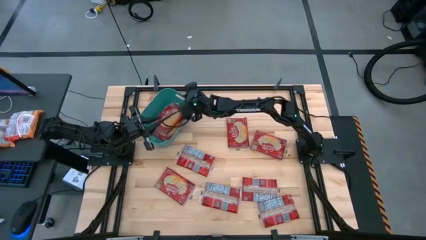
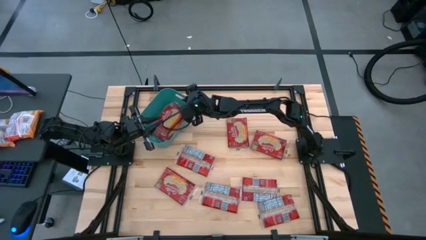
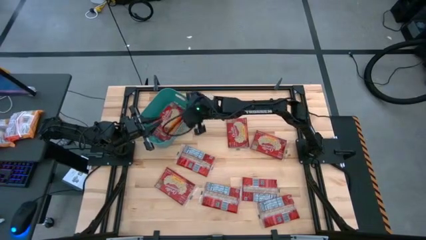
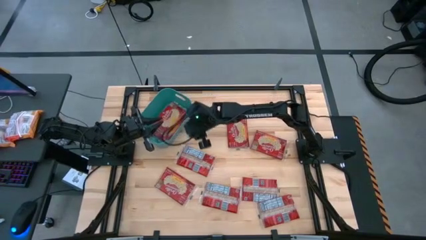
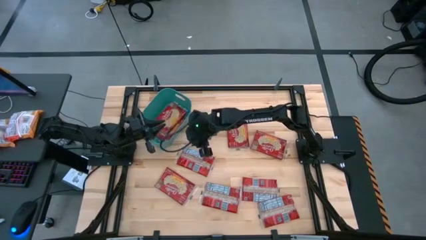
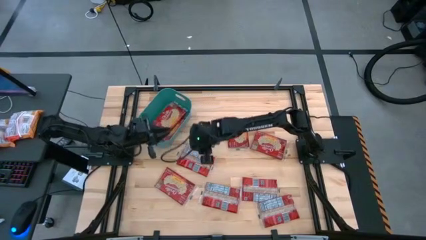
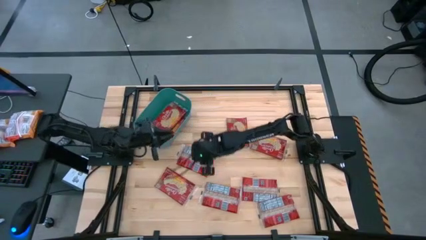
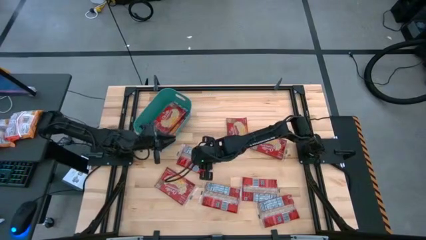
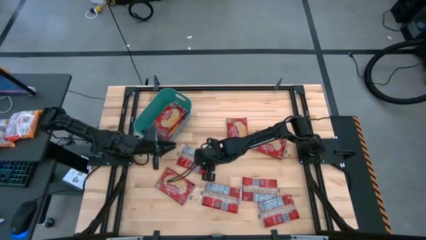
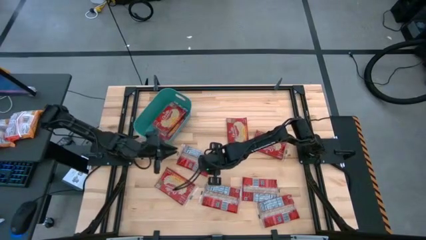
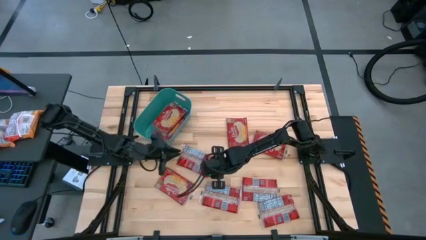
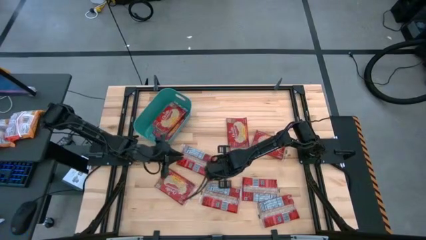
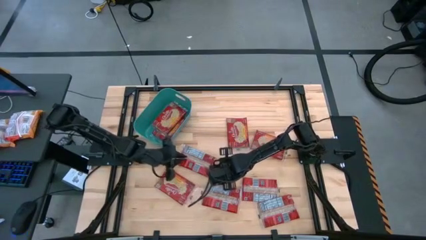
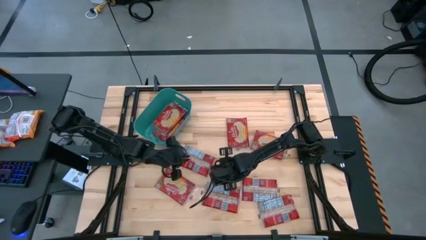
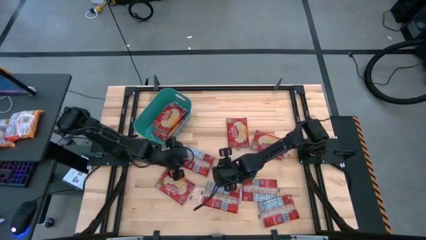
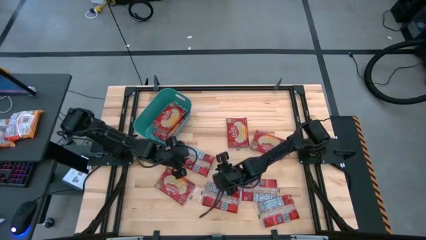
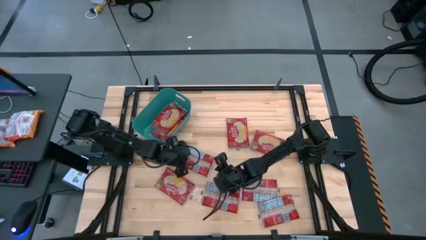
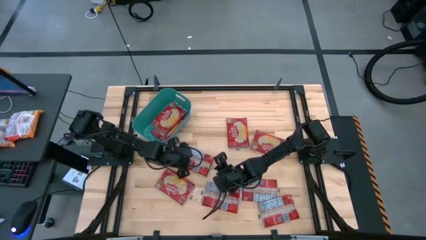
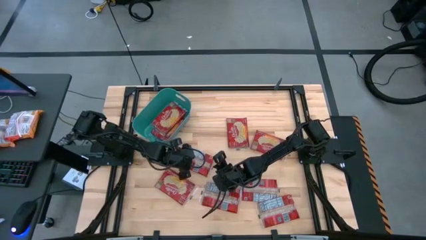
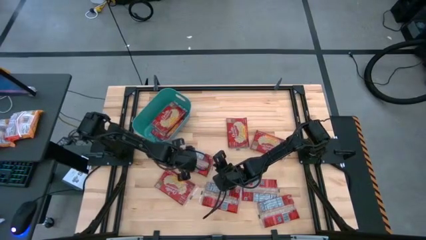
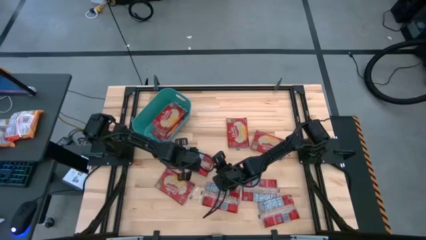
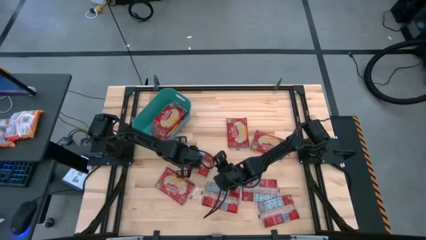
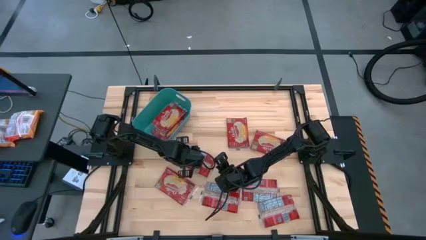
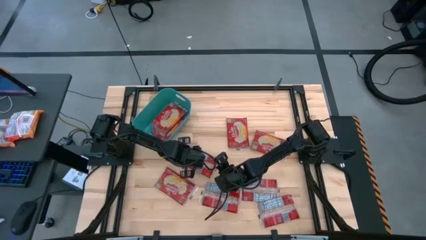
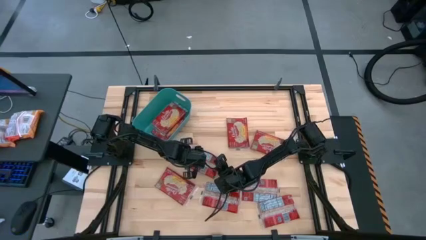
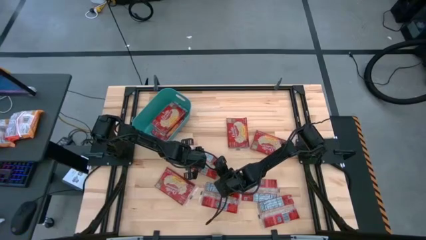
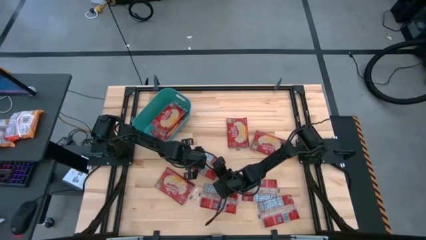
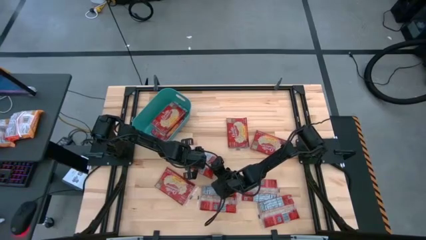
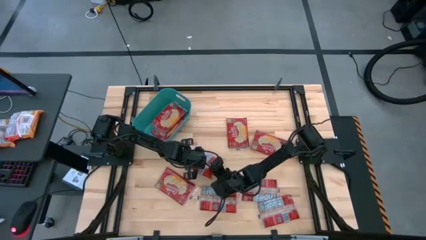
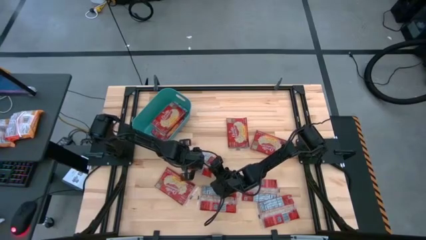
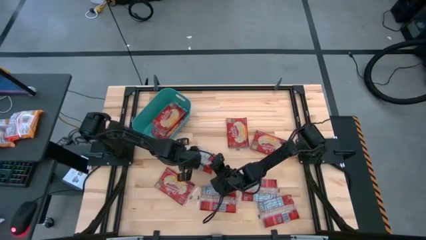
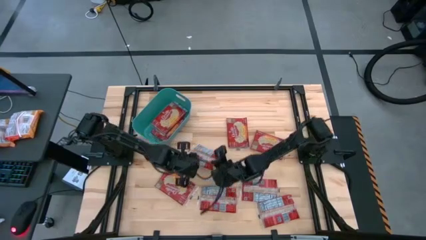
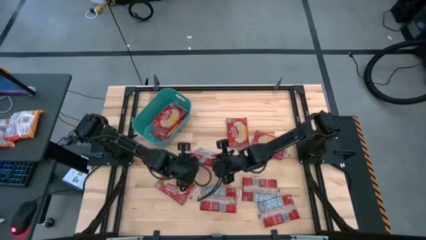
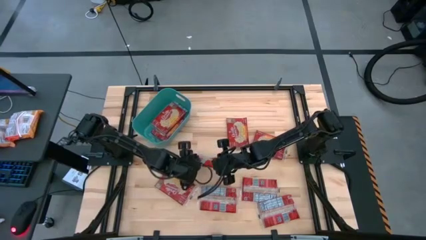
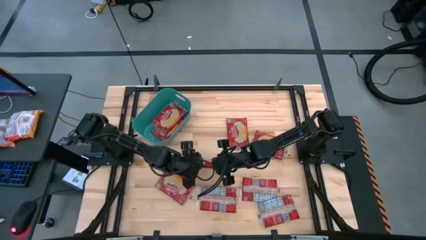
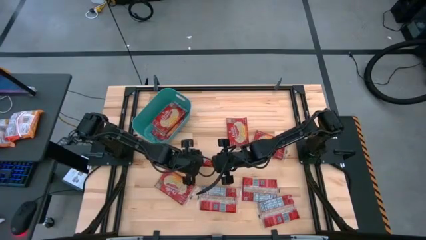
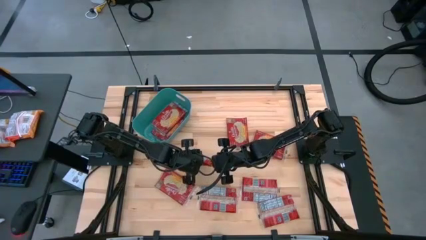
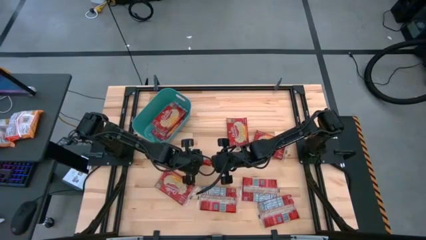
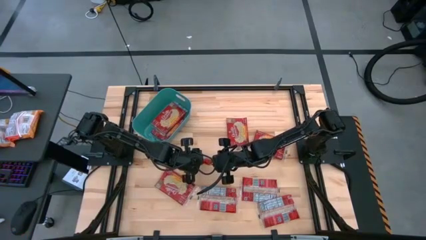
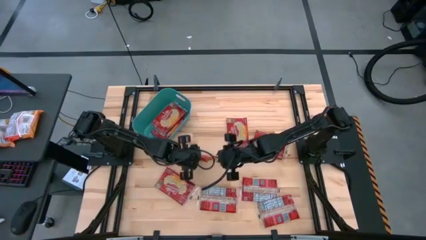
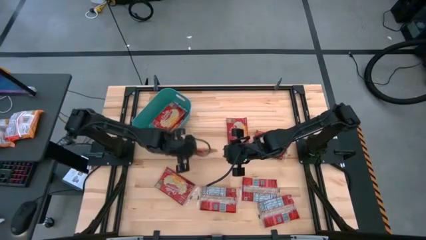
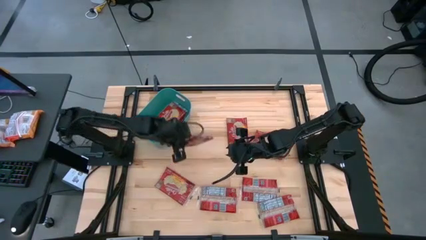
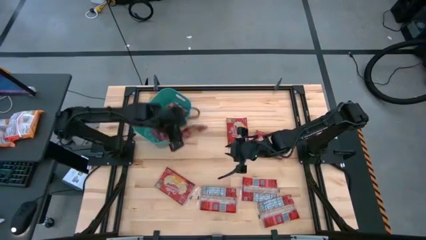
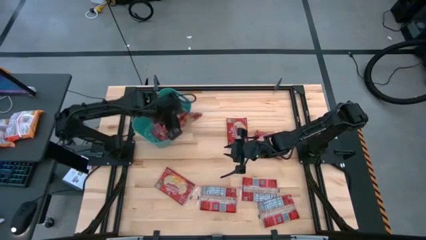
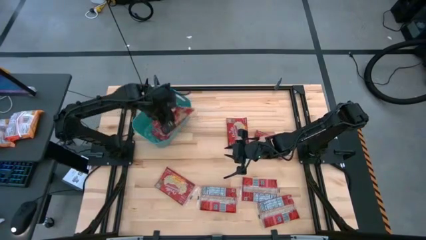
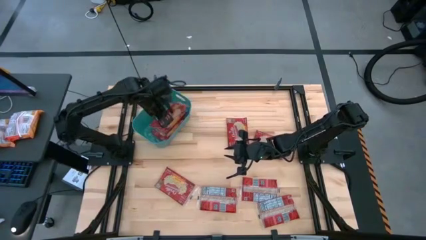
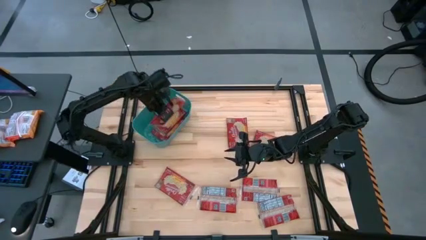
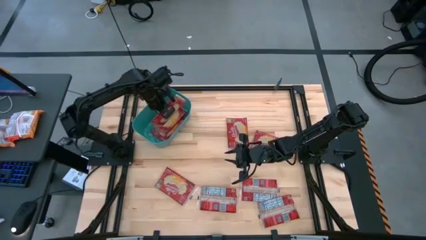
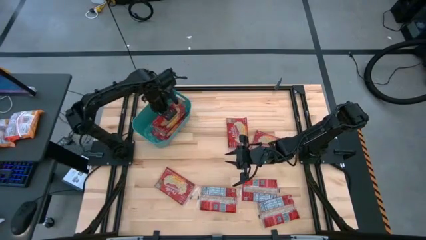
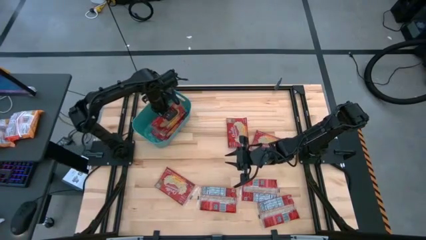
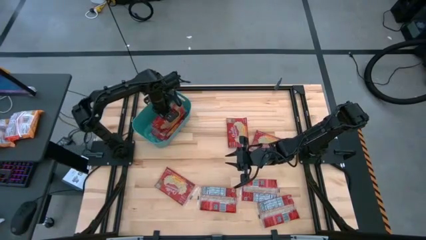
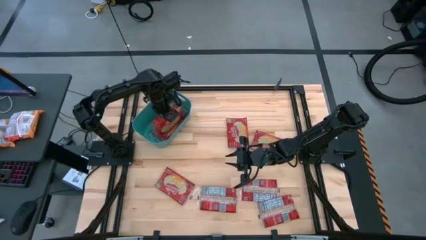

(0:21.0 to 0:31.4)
Task: Sort popcorn bags into baskets
Put the red popcorn bag into the green bin

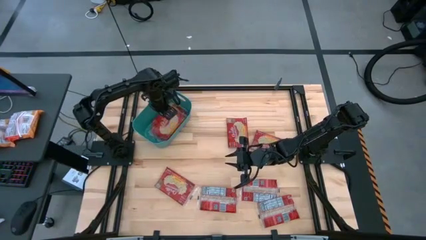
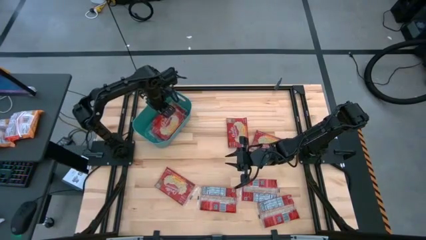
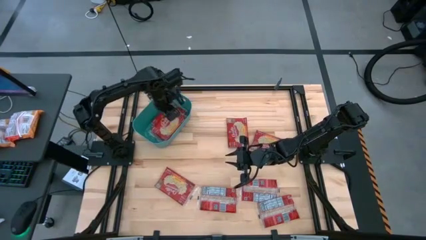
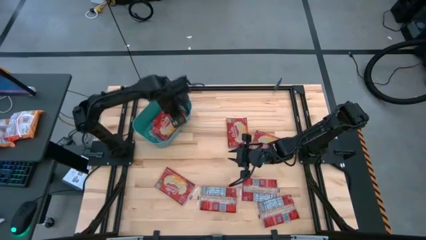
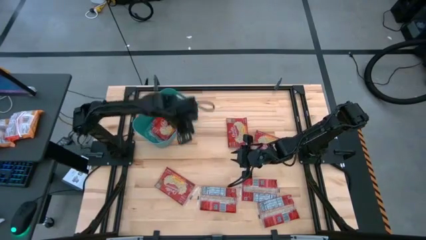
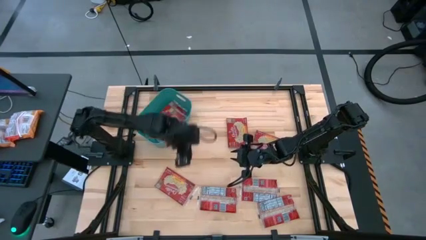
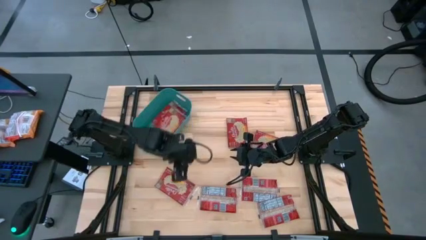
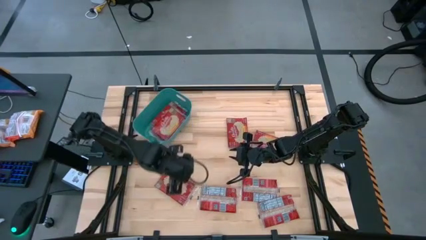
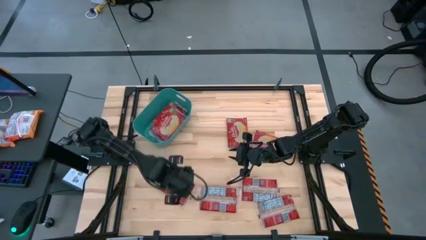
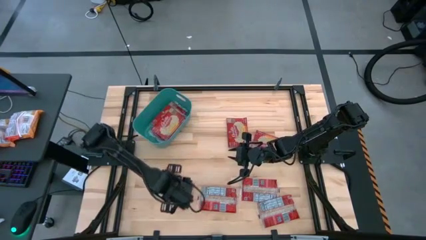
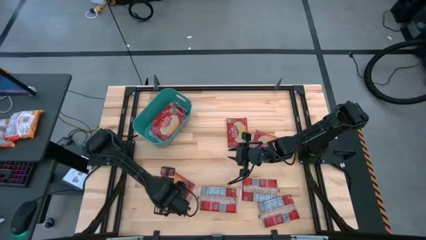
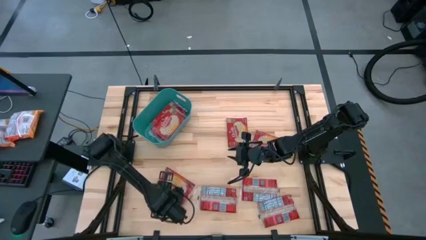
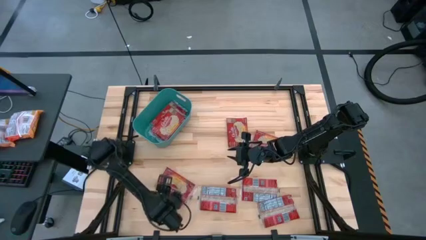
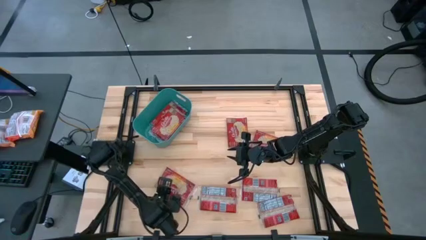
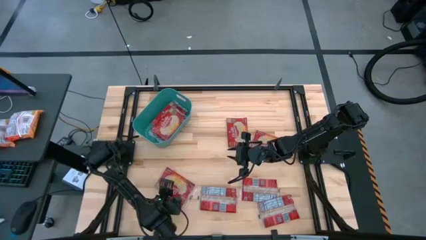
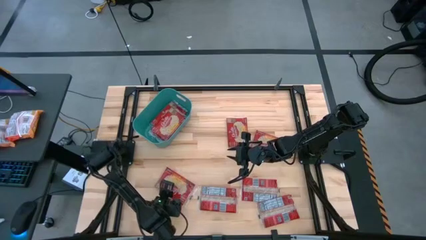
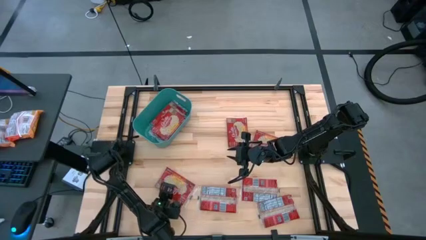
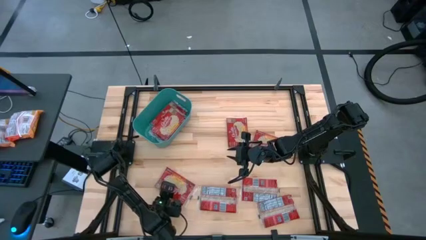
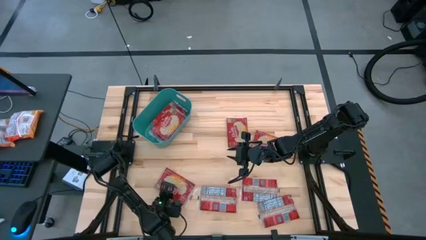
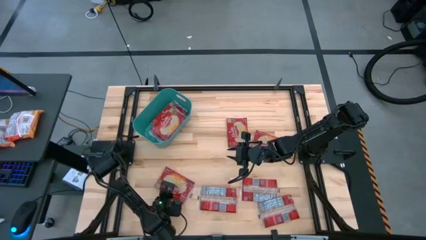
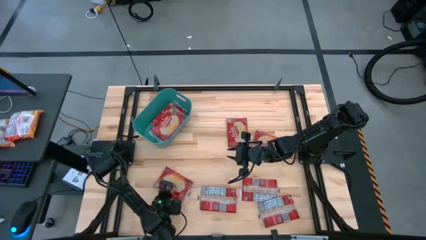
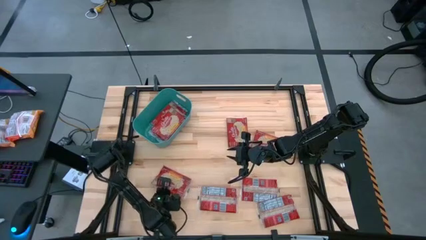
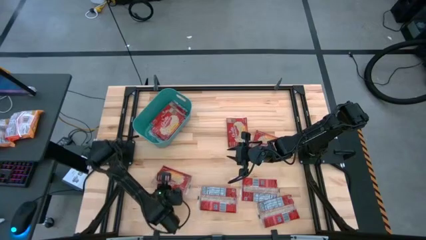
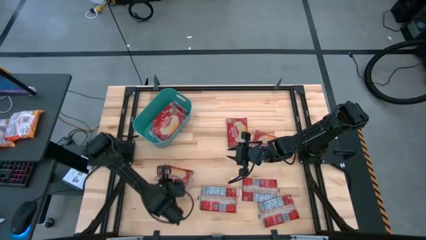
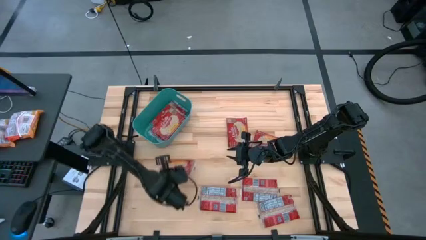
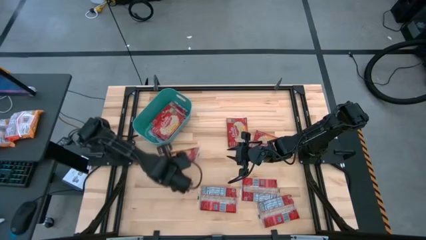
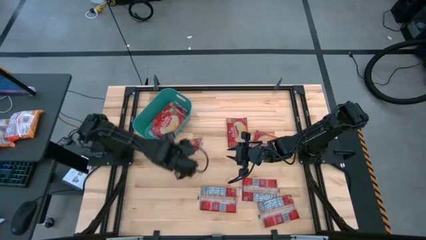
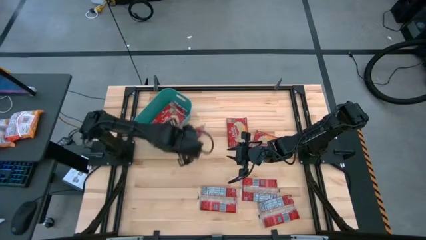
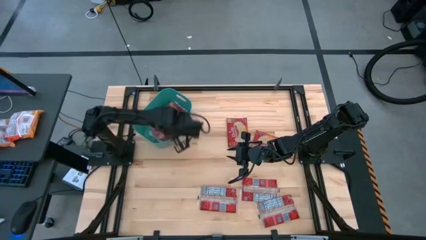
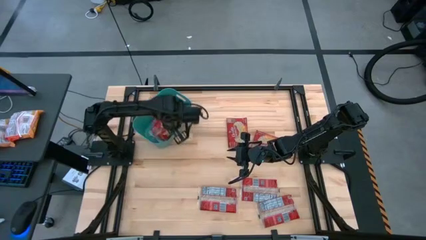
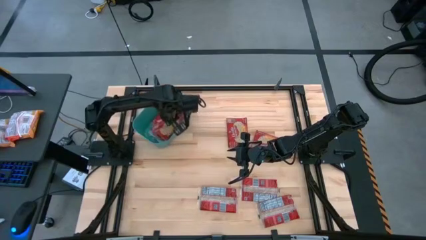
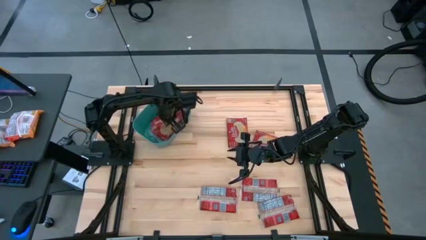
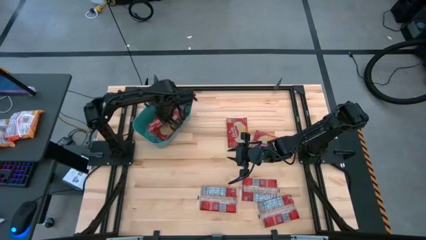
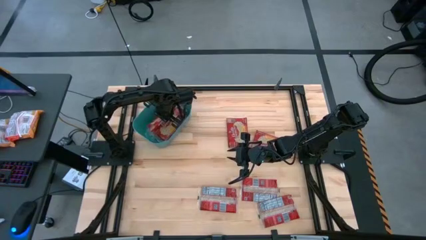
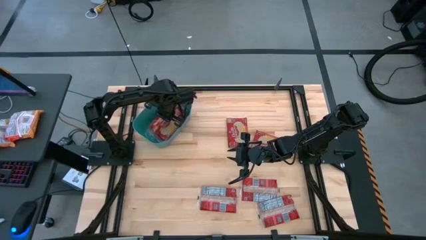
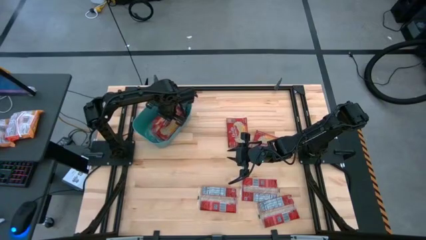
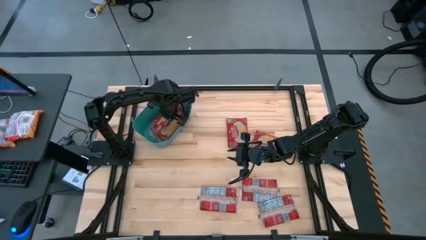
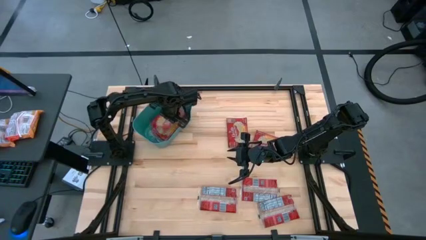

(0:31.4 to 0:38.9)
Put the red popcorn bag into the green bin
